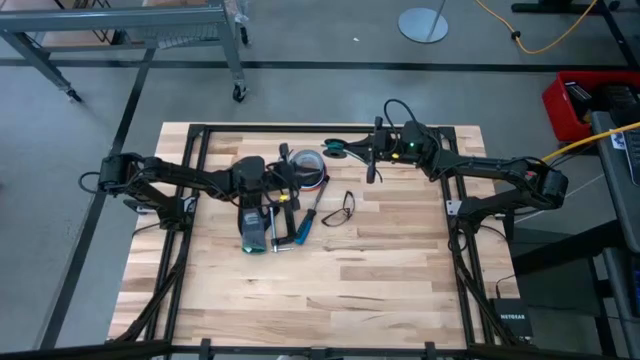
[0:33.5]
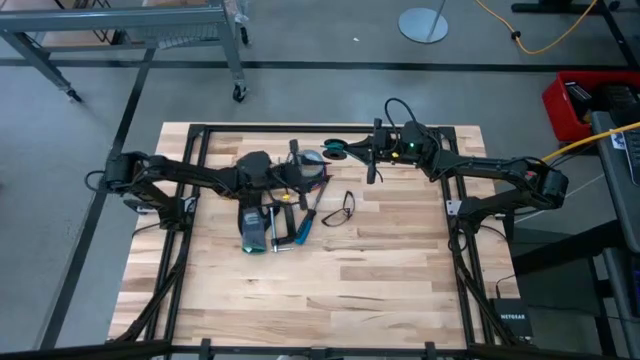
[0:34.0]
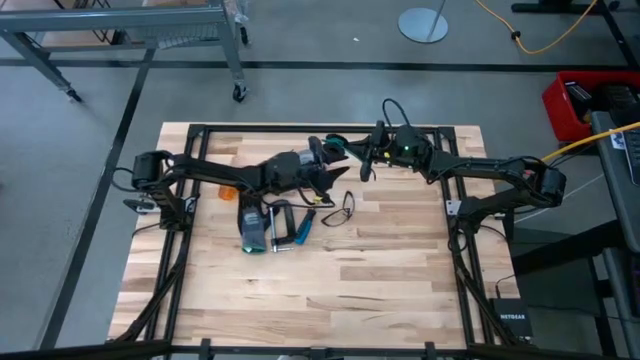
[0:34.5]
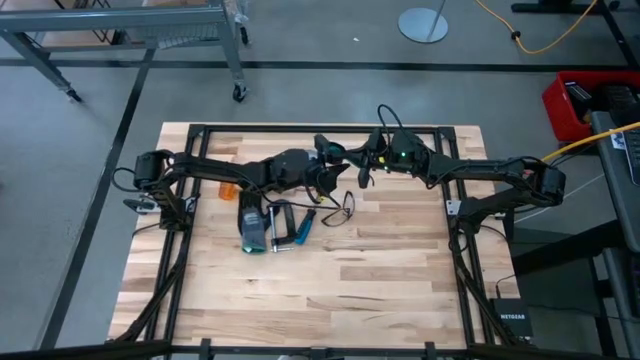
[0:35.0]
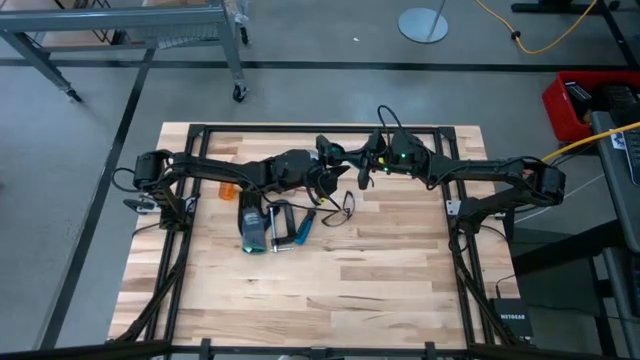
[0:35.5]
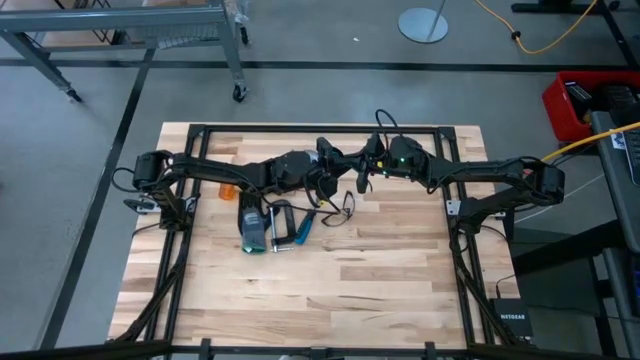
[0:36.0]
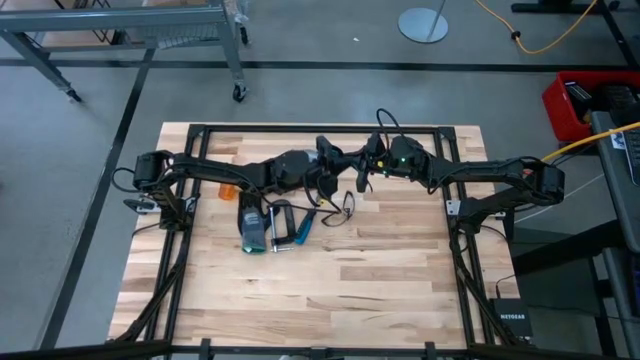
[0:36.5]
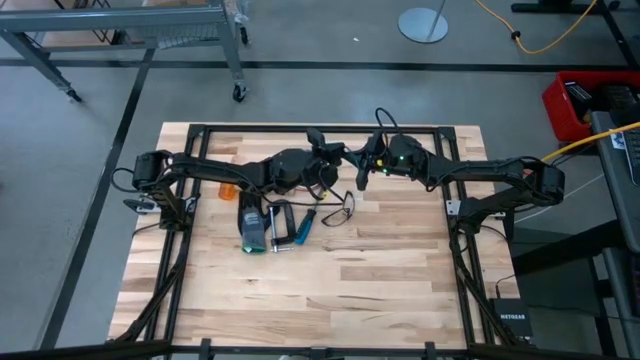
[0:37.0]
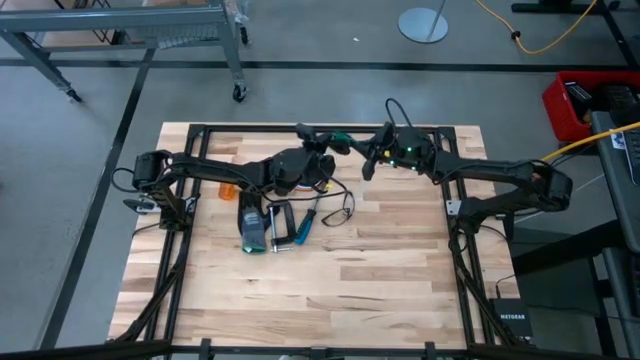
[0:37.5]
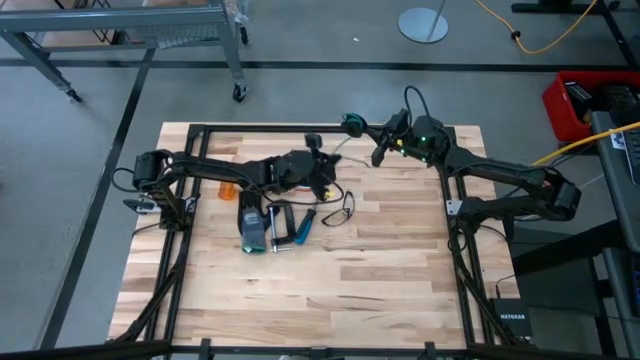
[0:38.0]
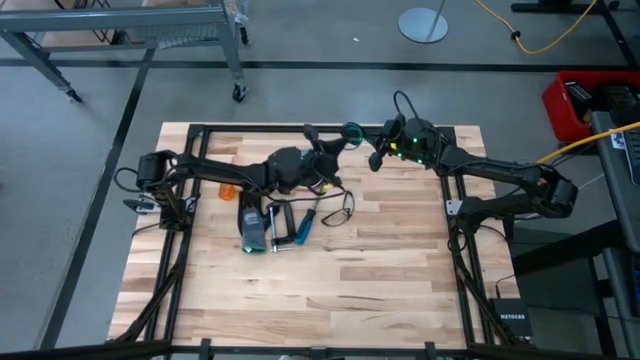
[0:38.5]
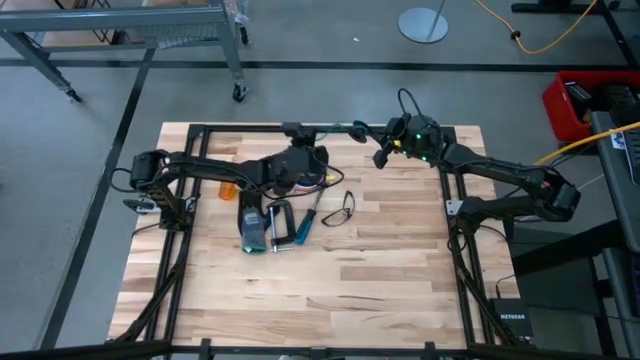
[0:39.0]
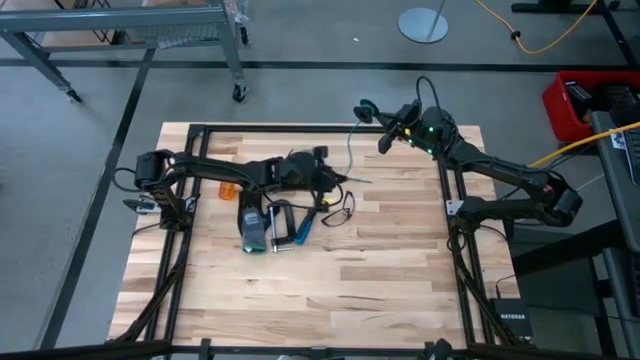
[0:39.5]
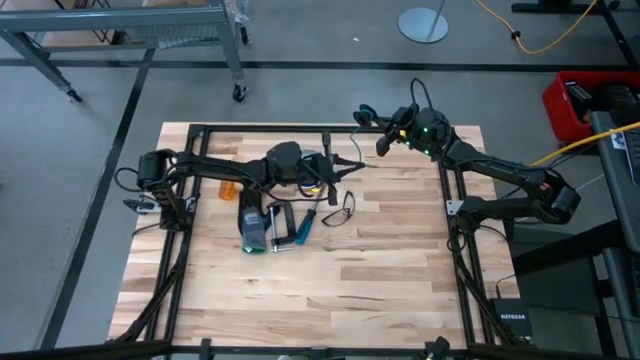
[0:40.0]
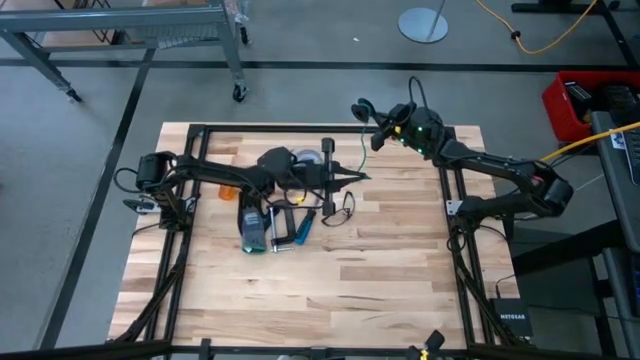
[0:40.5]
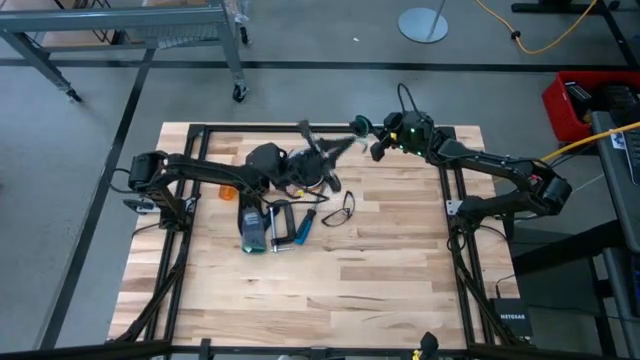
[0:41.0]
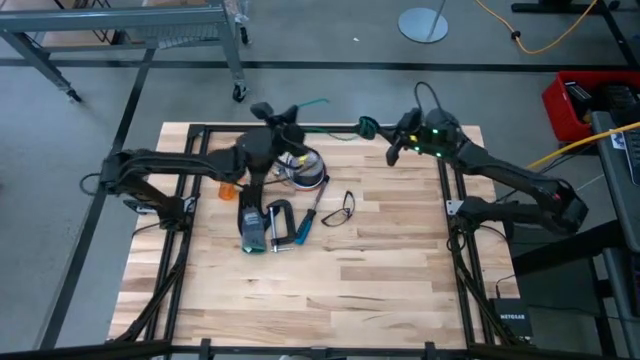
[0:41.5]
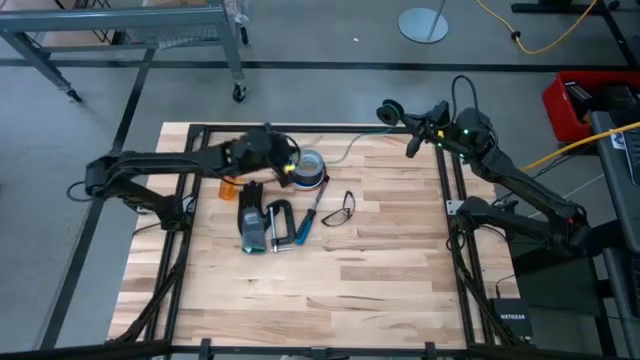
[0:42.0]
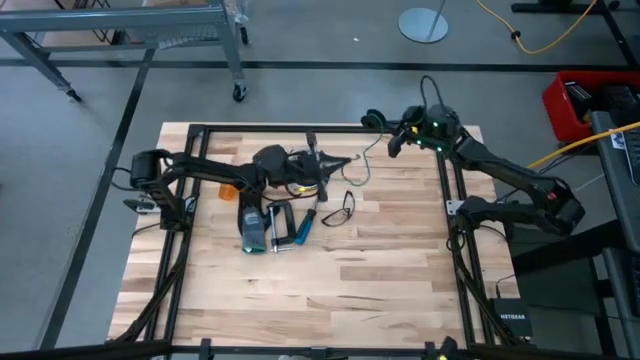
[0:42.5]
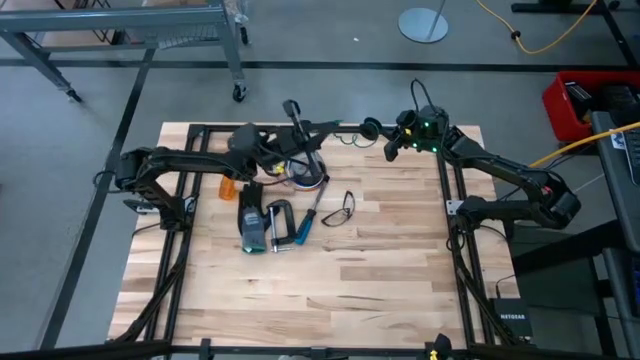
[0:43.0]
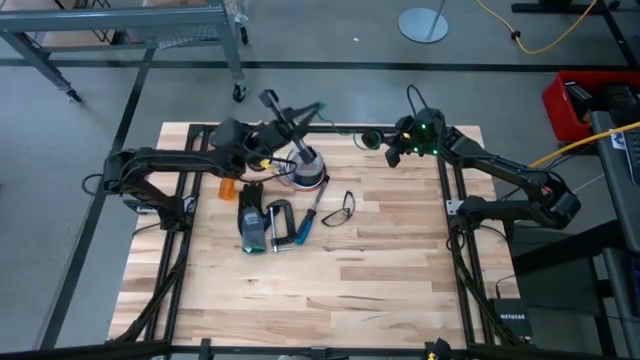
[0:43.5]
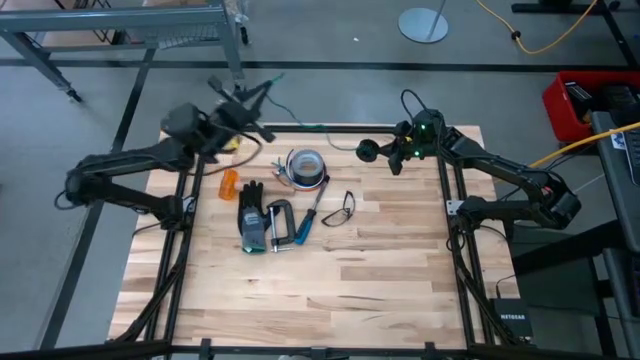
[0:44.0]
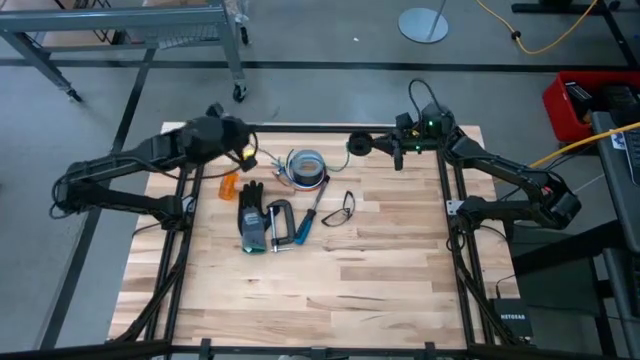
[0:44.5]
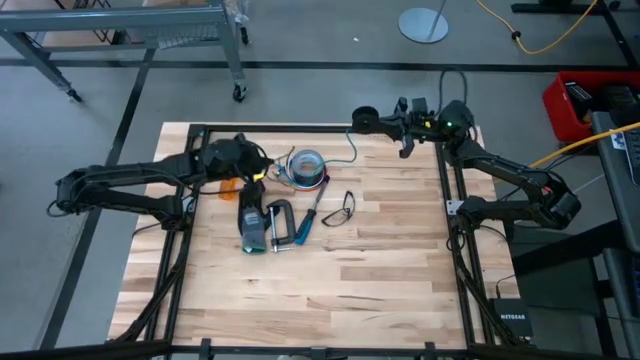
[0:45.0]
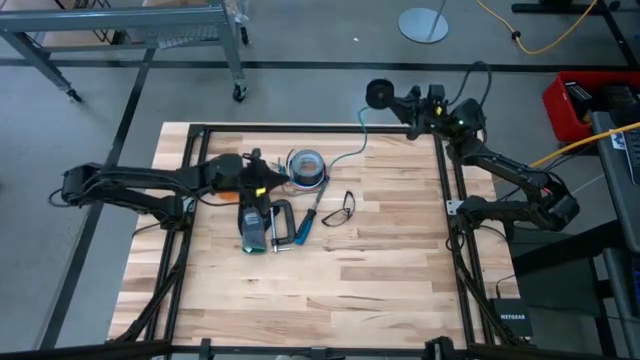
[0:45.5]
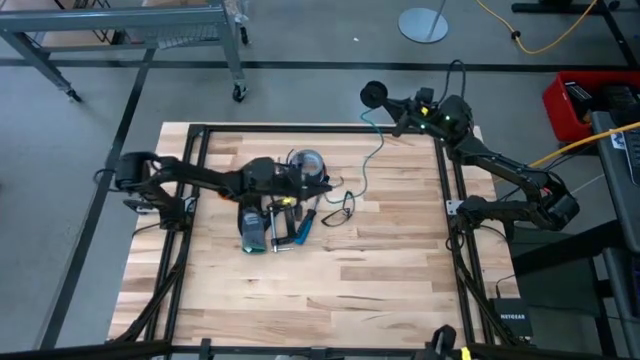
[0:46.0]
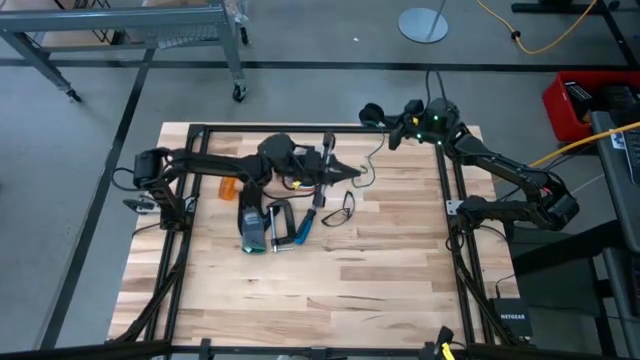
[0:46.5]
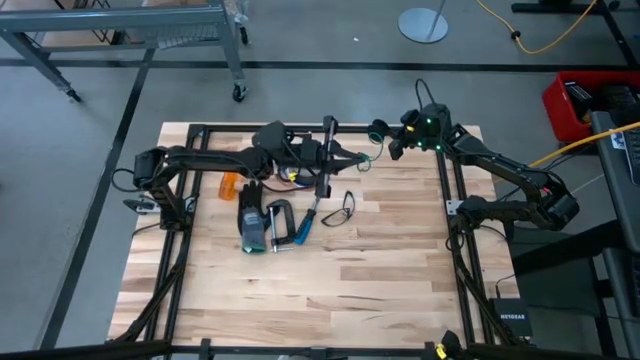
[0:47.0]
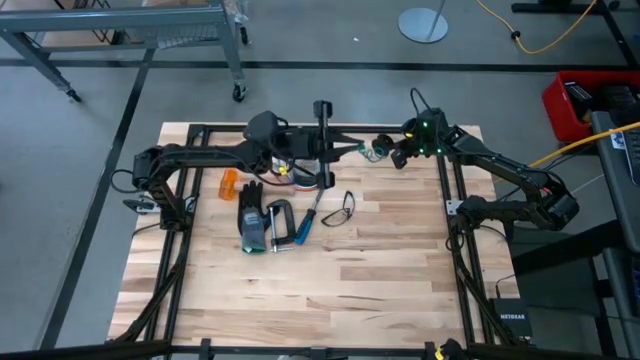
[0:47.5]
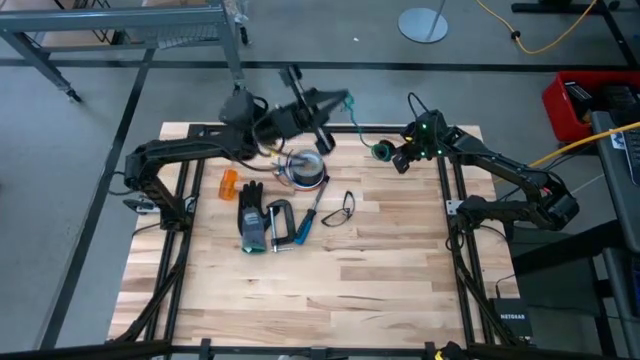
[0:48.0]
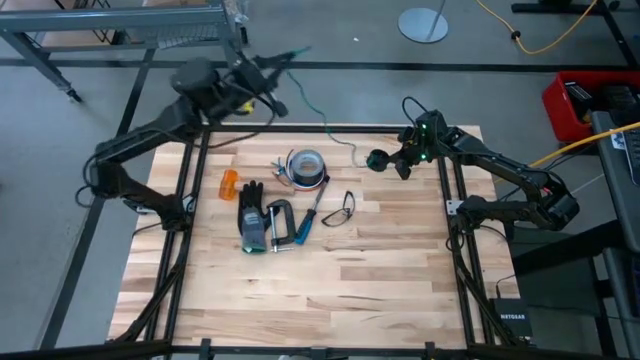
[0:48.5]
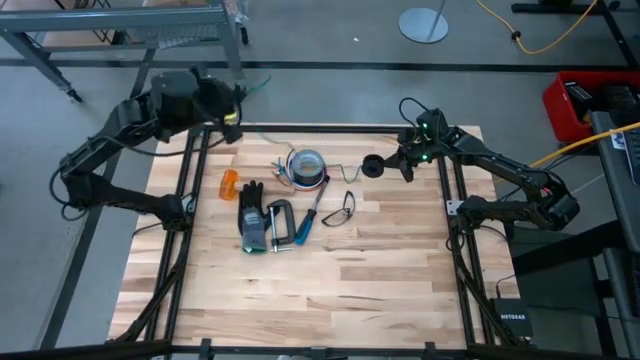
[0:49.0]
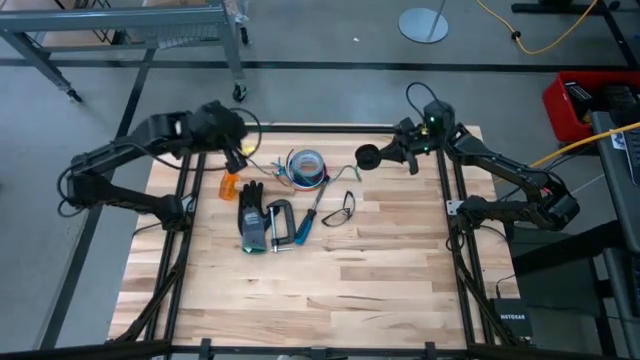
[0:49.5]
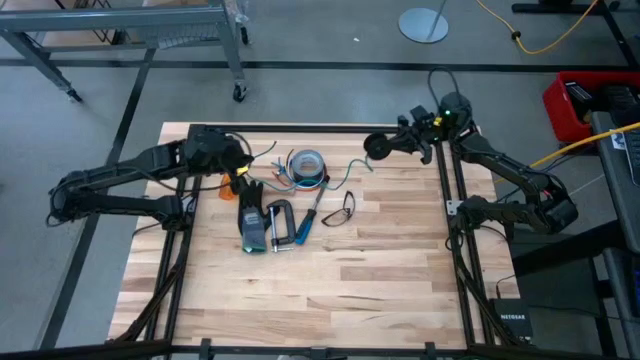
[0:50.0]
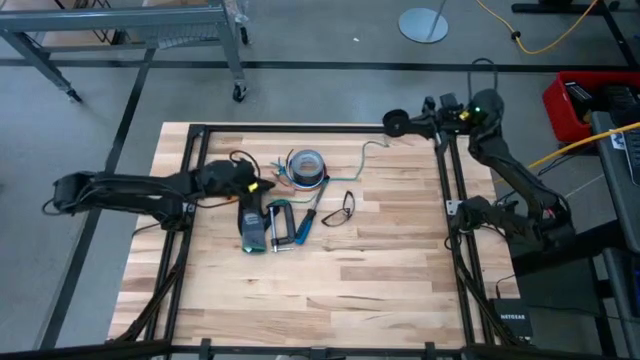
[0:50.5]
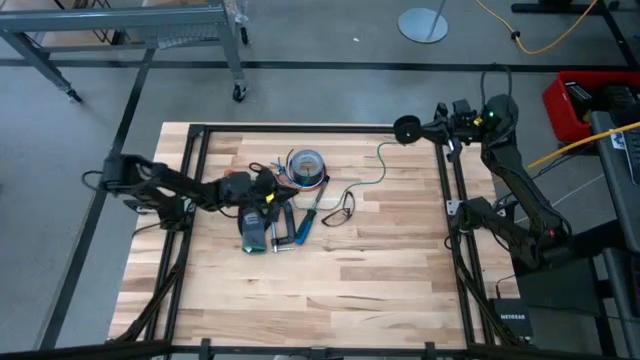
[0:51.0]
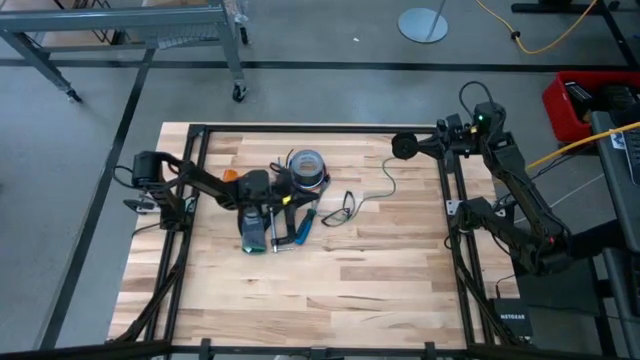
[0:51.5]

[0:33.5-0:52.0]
Task: Coil cords
Uncoil the wire from the cable spool
